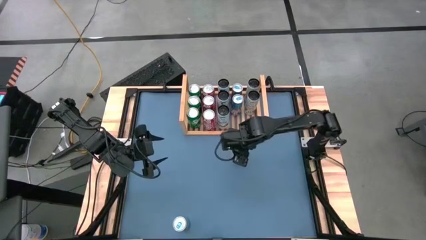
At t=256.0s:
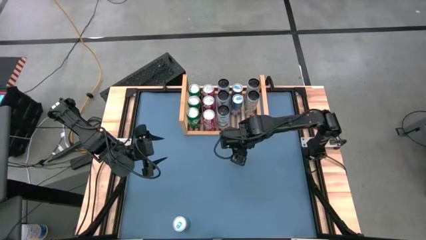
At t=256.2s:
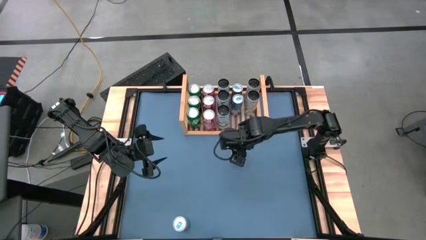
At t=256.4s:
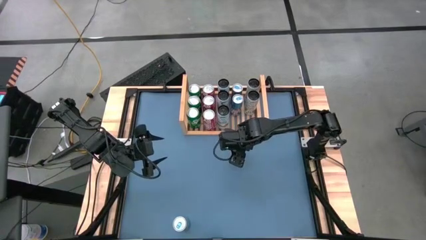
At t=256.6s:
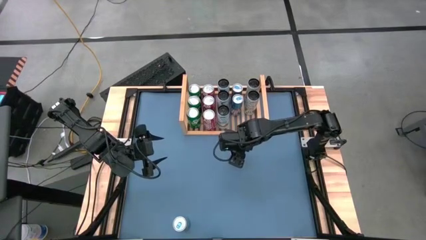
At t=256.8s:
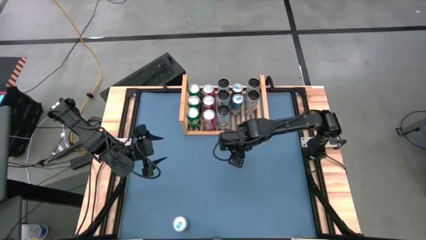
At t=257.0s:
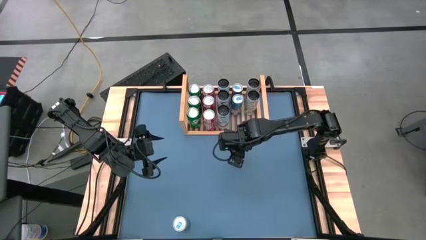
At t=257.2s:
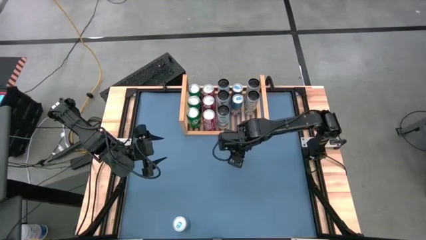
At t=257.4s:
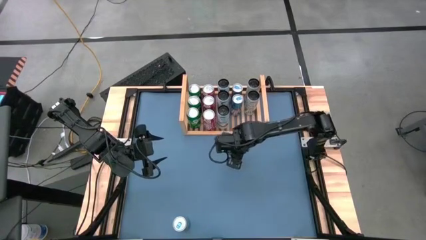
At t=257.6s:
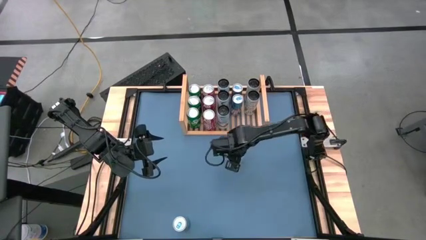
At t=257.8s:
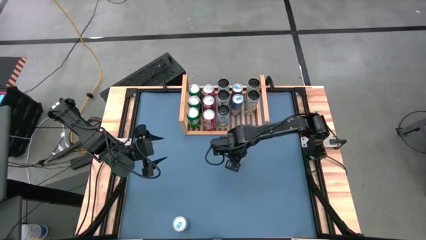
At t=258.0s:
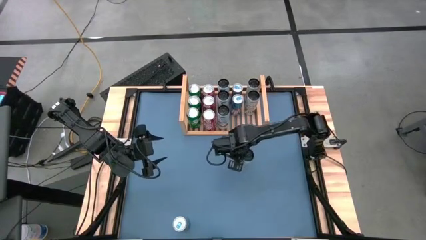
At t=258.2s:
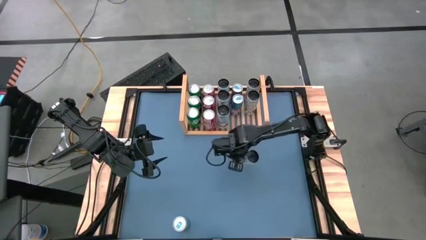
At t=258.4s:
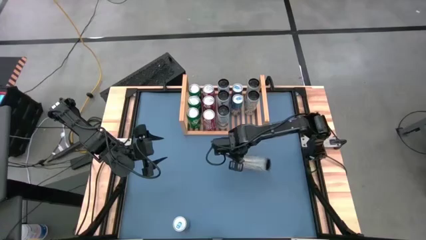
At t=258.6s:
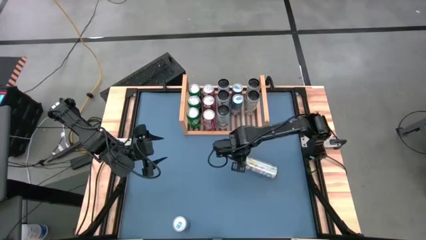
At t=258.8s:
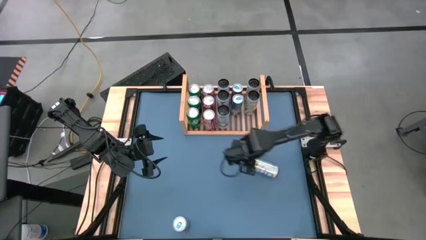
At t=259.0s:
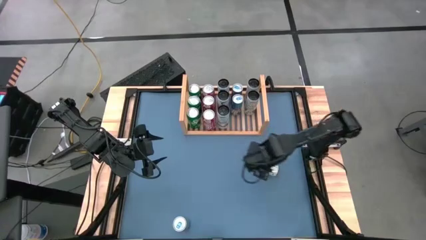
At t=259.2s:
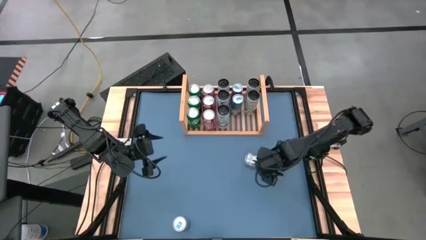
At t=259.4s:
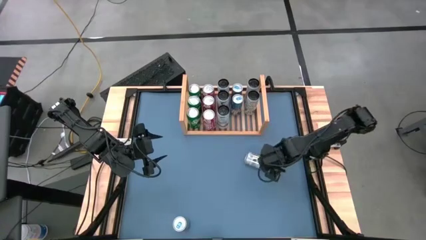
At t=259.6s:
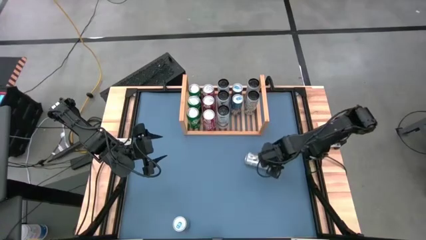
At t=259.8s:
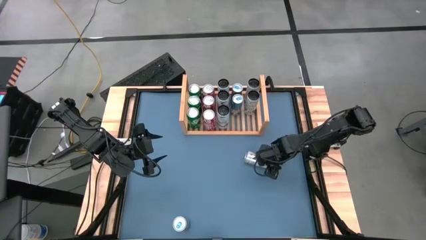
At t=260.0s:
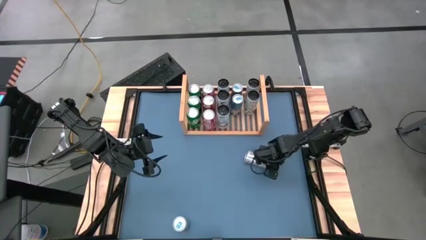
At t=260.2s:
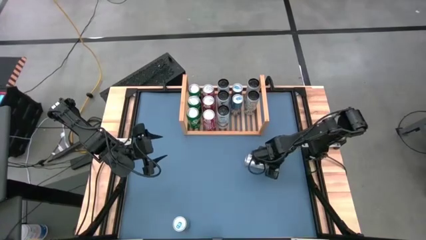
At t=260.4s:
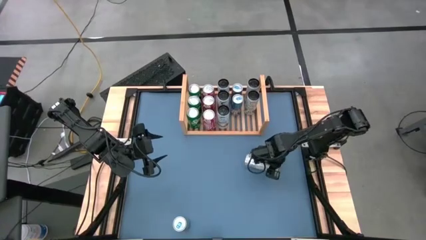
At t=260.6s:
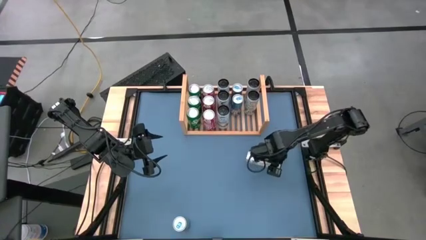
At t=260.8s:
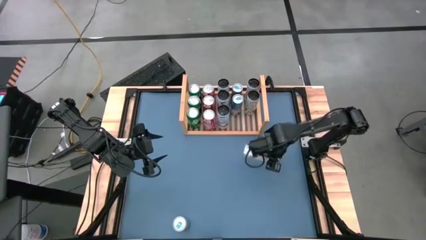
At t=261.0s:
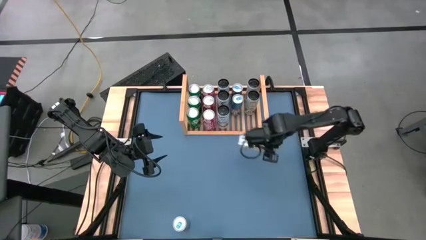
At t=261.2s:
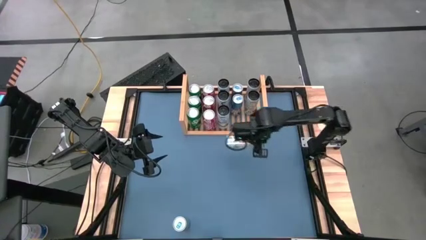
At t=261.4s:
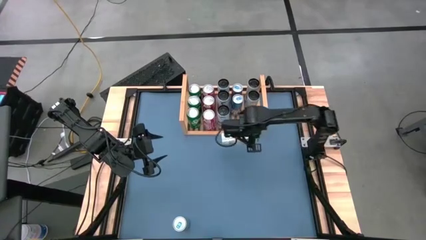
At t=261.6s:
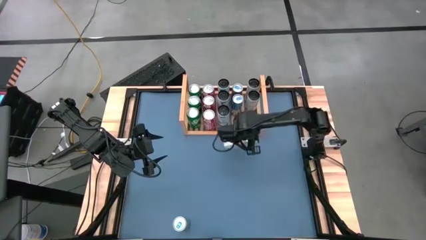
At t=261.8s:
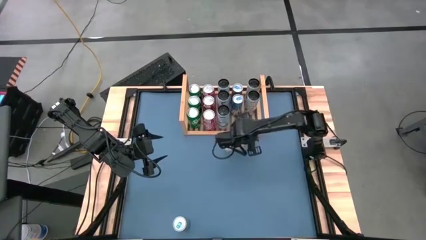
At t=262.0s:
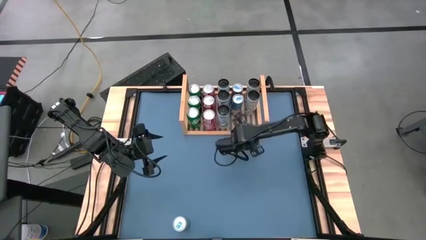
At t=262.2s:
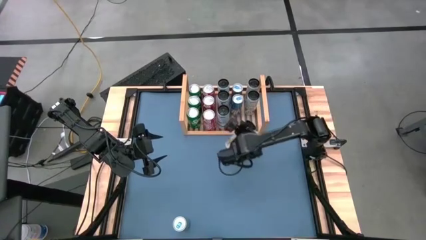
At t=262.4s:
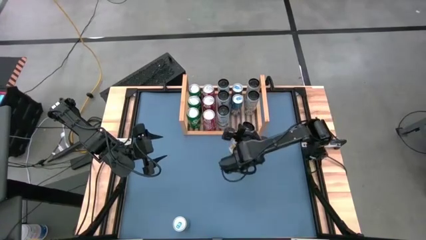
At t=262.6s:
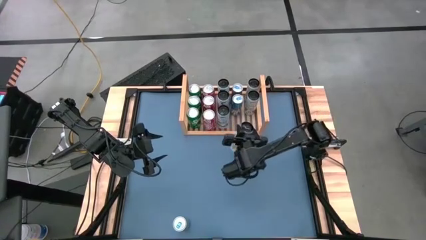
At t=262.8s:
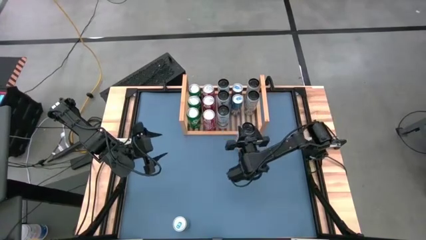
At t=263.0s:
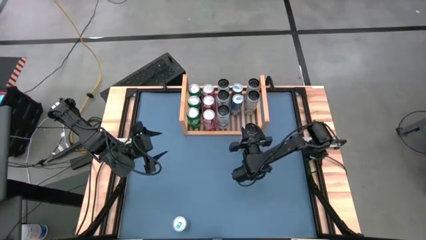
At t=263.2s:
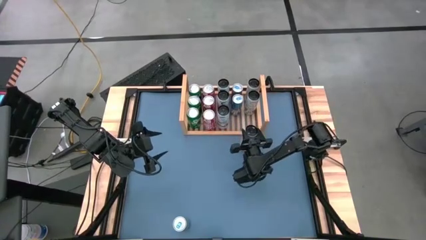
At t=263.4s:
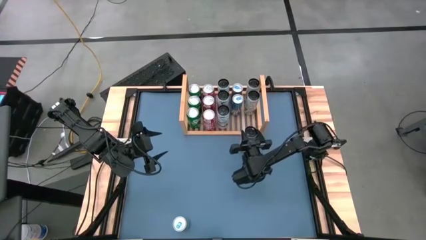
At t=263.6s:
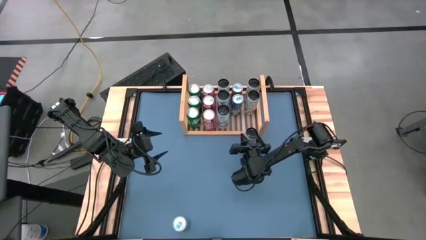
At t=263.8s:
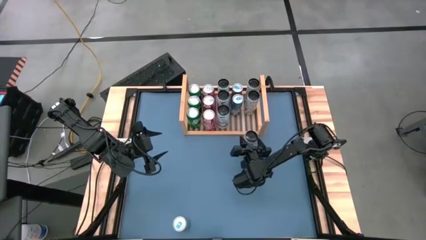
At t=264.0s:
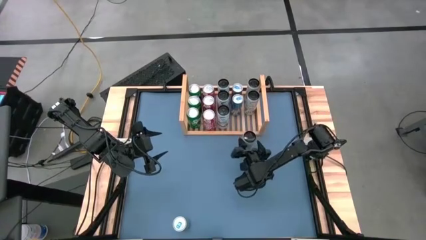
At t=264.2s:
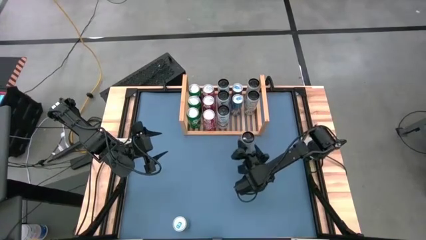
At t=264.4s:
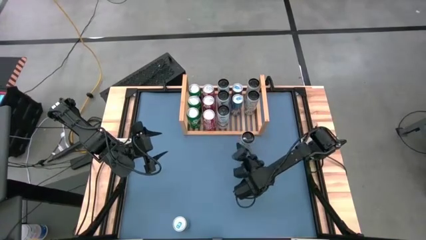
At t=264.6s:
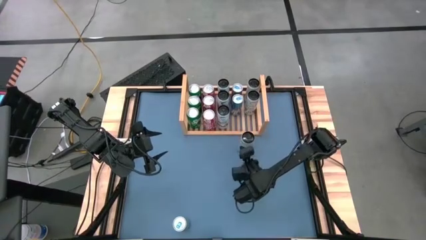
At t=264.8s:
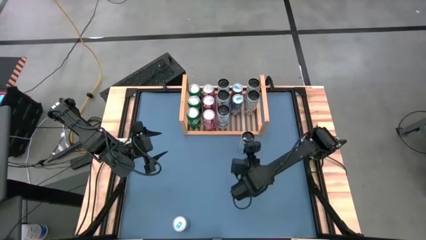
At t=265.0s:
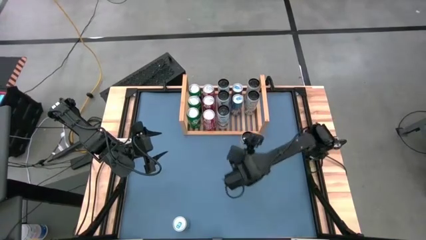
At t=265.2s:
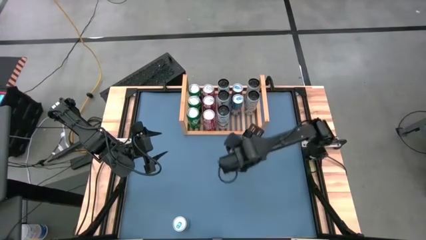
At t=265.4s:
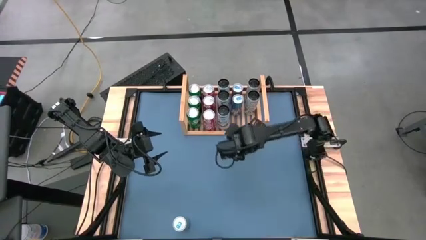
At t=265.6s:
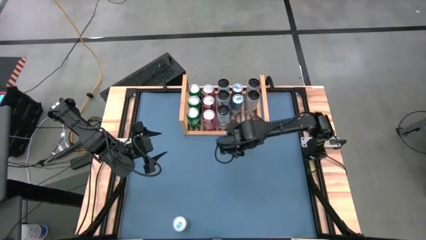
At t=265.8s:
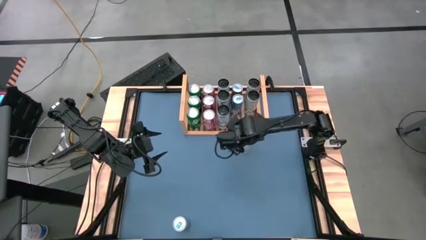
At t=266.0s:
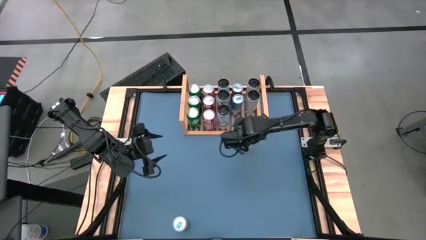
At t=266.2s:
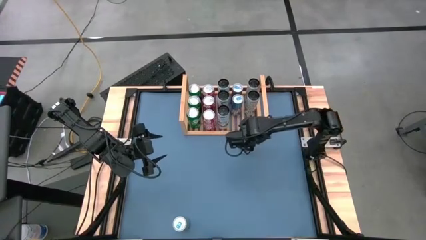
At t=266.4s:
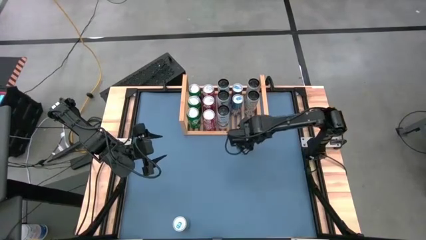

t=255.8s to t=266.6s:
Task: Place canned beverage on shelf
Put the bottom right white-yellow can aligned with the white yellow soda on the shelf

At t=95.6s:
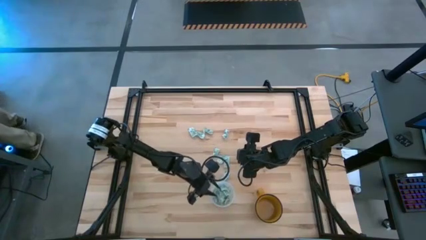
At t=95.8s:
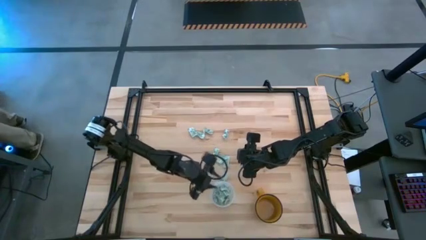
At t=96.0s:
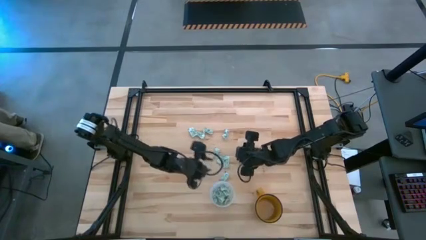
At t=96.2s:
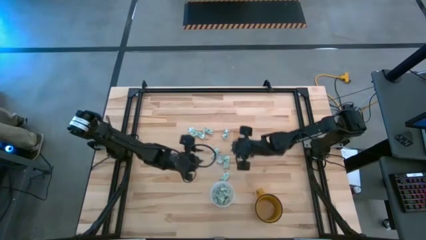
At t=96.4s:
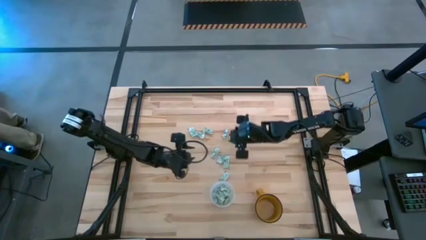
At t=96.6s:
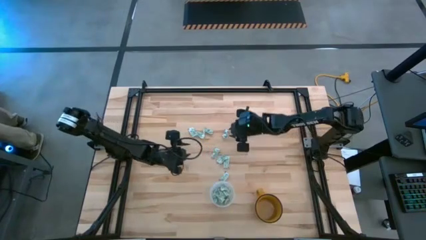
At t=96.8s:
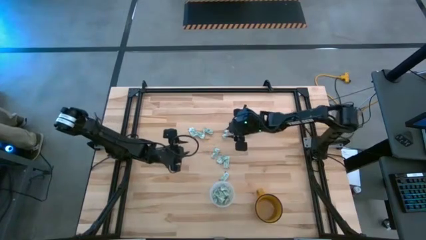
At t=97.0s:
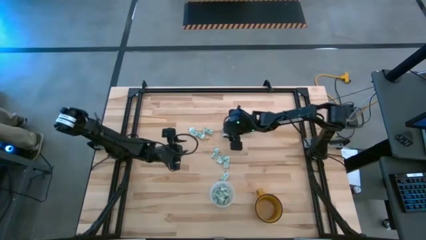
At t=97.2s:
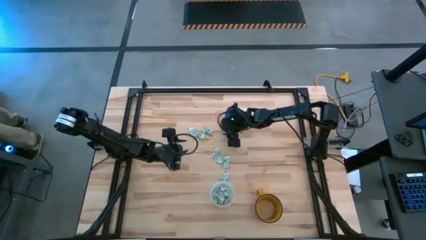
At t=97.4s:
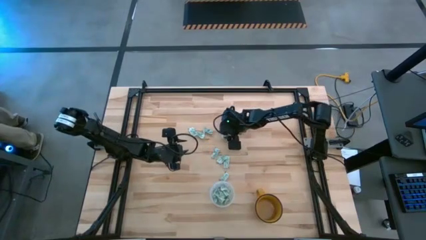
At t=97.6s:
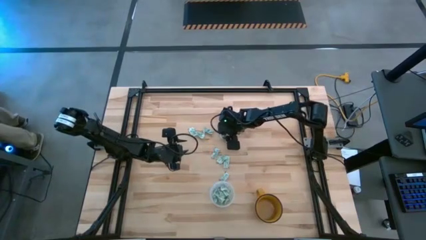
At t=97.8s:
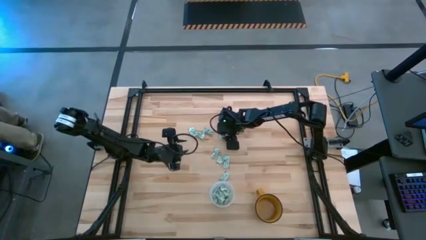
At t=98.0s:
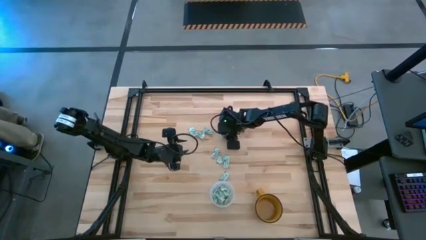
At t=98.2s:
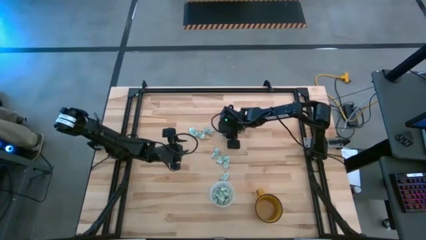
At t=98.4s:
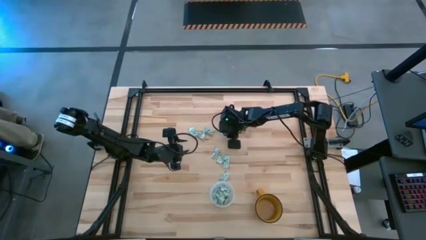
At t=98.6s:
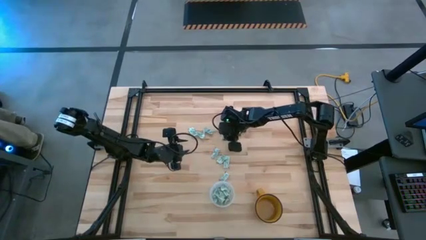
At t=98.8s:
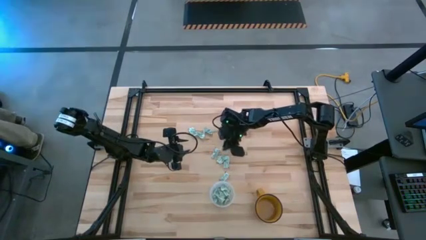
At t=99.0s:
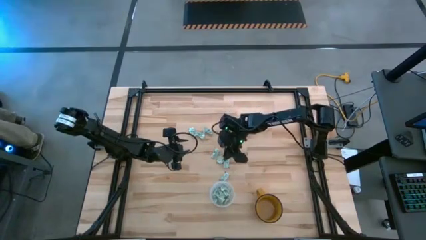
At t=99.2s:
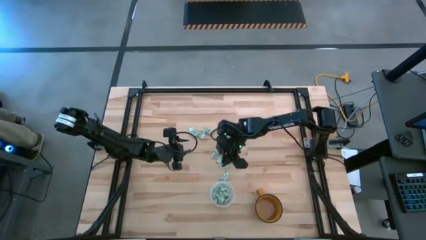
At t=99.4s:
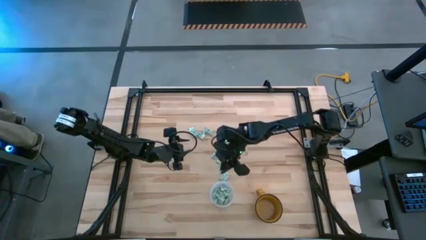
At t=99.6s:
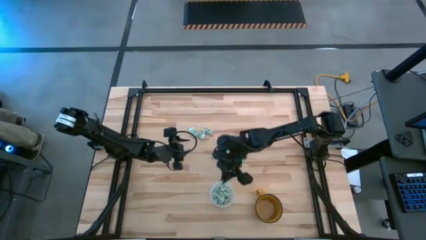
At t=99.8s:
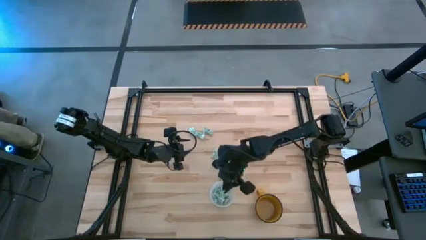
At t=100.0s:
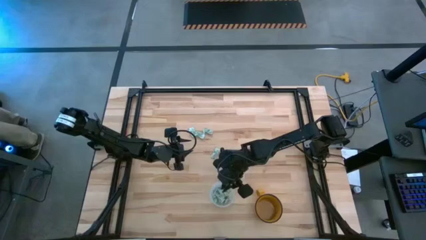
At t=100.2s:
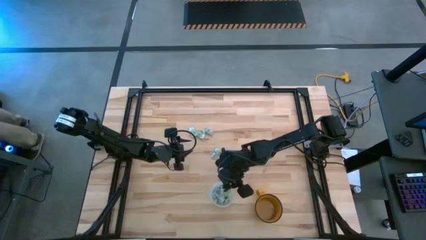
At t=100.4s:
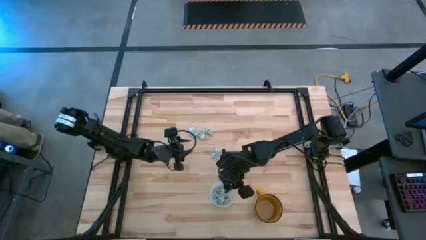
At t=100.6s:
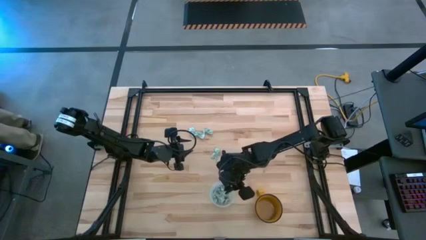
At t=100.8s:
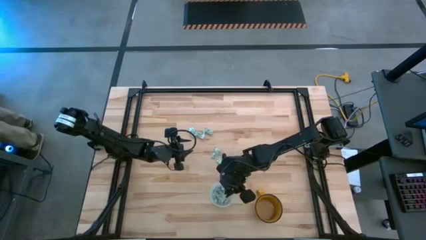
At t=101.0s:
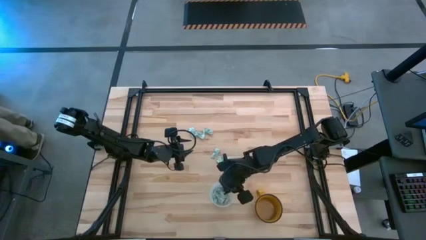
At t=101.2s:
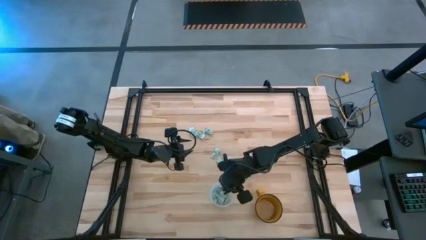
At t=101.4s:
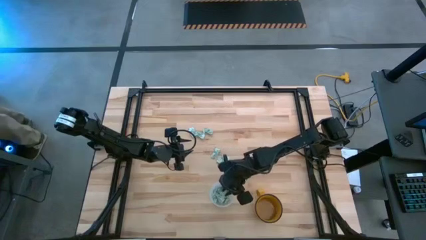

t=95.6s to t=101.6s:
Task: Pick and place Stevia / Truvia into bins
Put the stevia packet into the transparent bin
